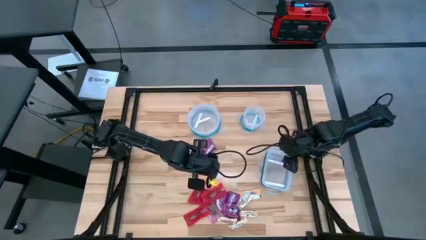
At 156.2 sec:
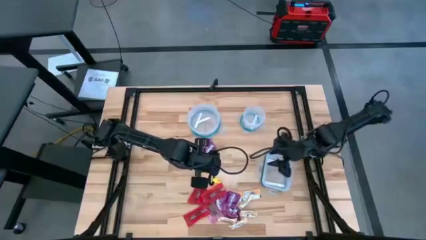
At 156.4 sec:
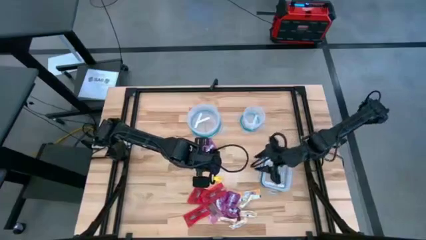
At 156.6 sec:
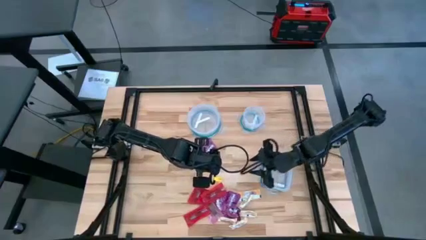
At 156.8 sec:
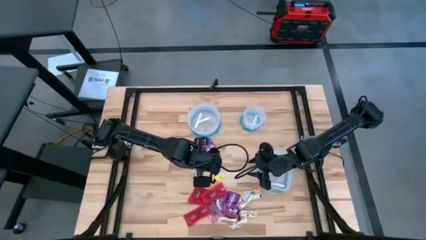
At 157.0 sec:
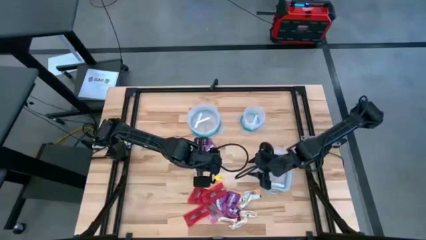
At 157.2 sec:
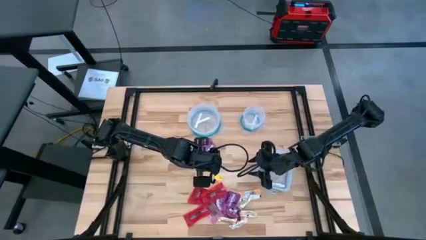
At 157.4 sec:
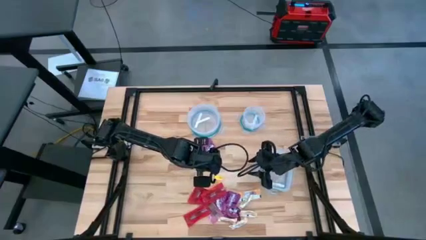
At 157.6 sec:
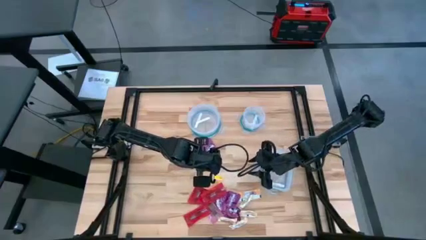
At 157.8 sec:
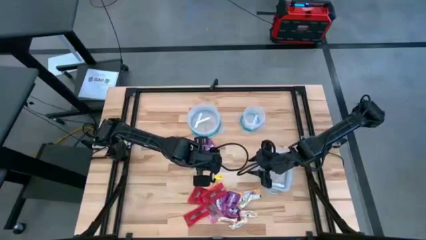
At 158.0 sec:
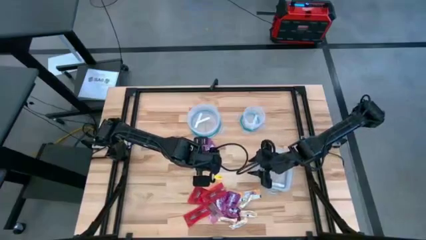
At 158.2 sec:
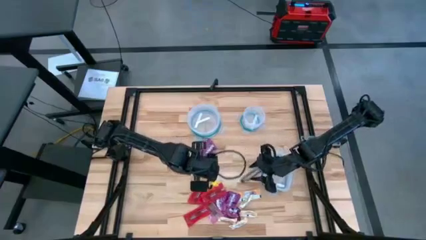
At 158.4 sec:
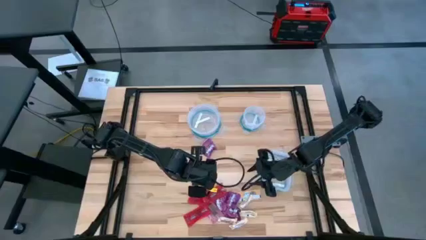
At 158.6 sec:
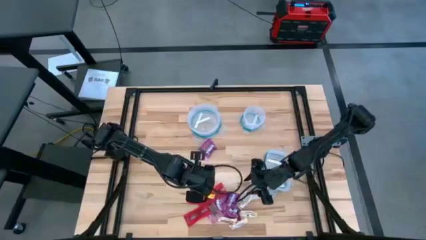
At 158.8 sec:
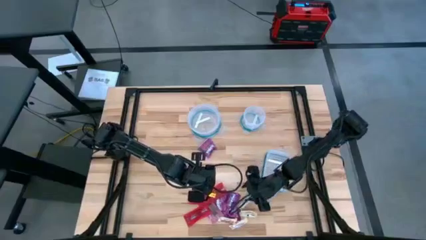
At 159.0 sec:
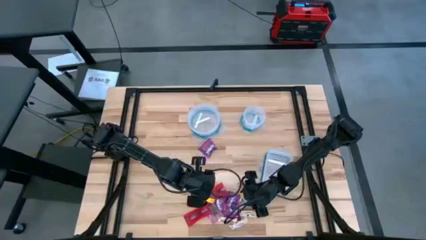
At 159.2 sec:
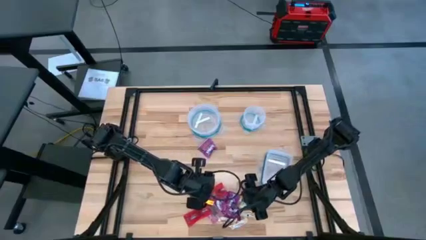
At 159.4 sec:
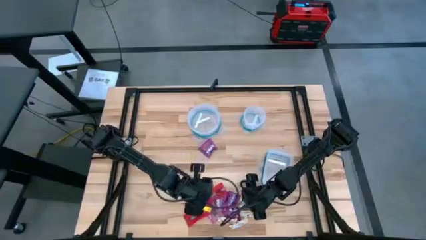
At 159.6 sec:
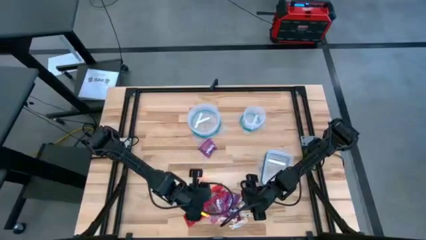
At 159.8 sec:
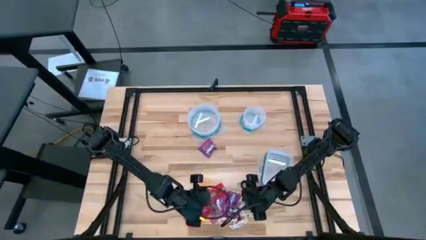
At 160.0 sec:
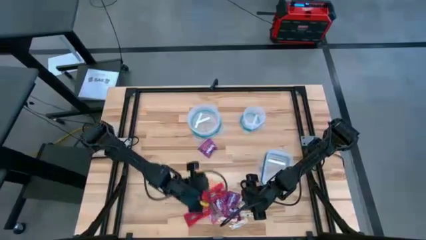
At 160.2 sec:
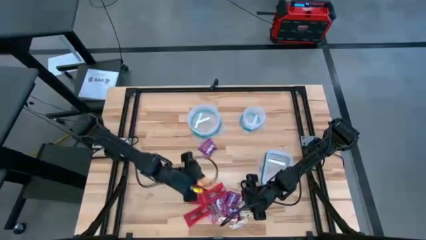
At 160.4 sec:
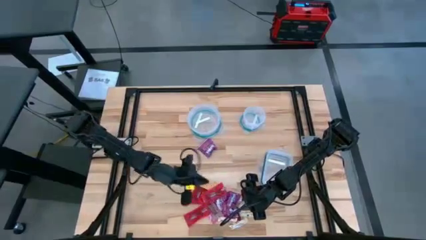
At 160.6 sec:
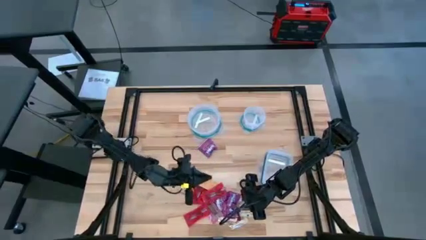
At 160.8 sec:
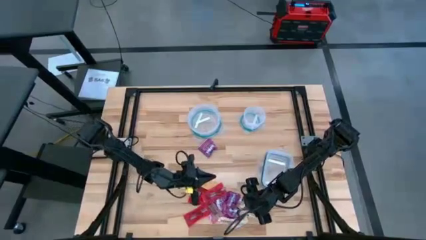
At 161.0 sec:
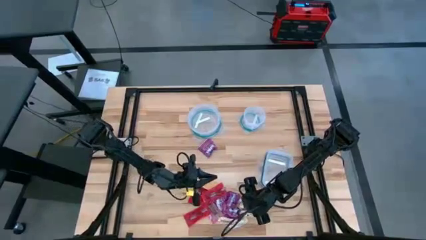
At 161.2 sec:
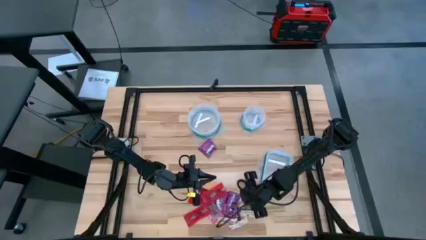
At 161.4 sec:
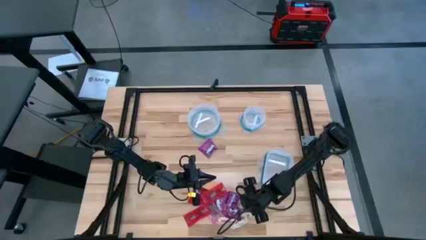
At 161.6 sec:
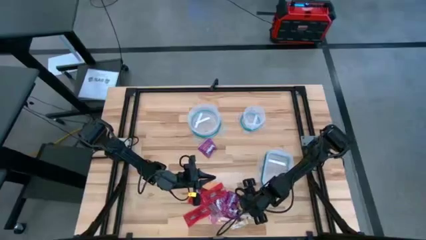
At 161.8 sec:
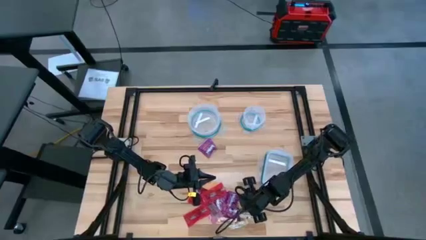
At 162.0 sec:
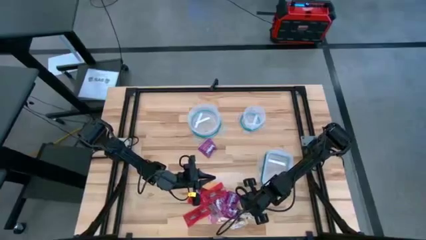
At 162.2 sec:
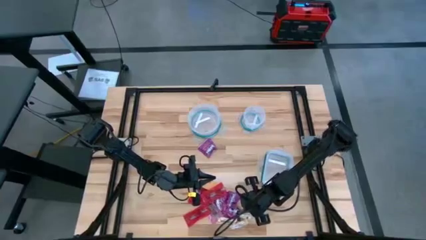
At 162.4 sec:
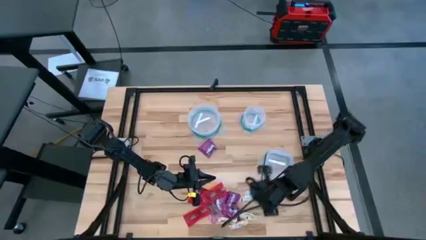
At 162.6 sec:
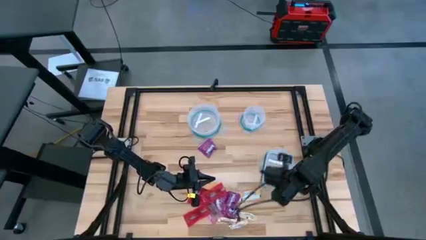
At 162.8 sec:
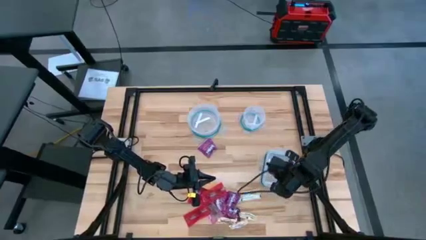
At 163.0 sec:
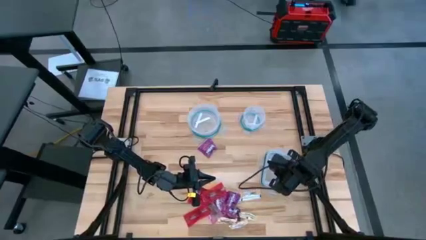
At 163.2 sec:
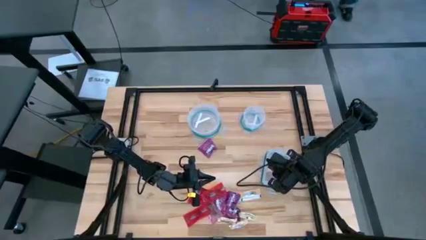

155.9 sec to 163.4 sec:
Task: Sort candy
Put the light yellow candy into the rectangular transparent bin

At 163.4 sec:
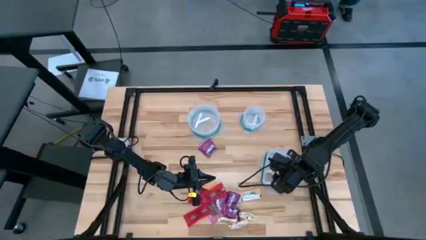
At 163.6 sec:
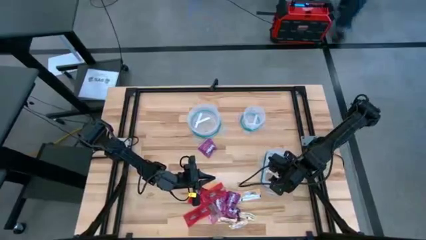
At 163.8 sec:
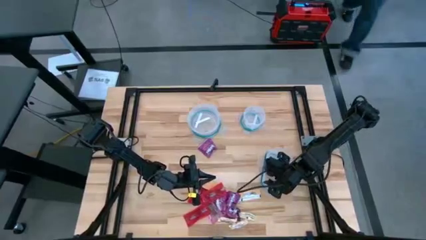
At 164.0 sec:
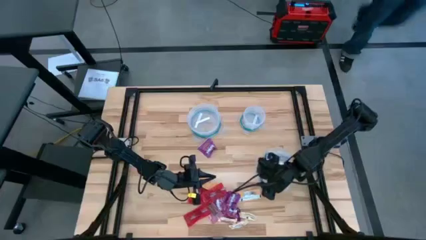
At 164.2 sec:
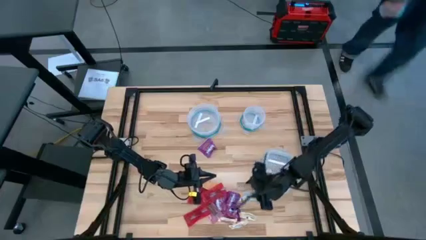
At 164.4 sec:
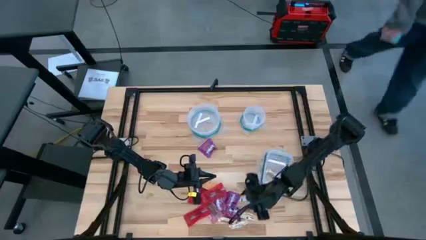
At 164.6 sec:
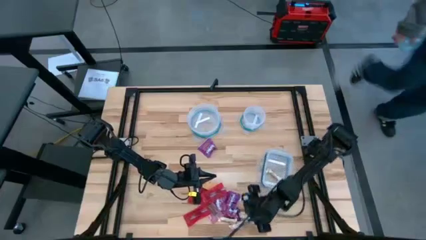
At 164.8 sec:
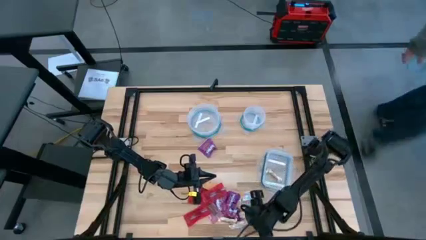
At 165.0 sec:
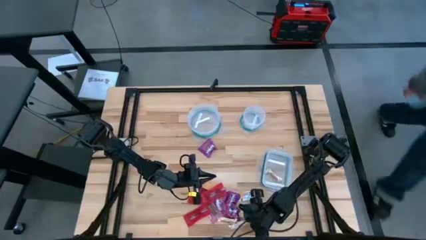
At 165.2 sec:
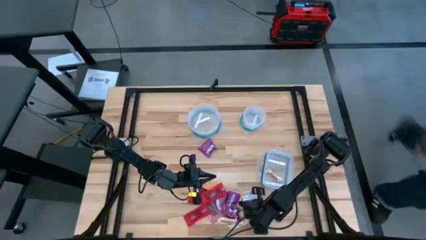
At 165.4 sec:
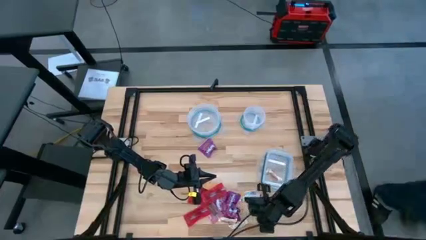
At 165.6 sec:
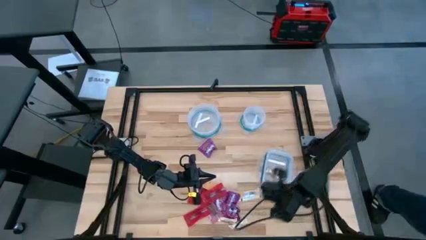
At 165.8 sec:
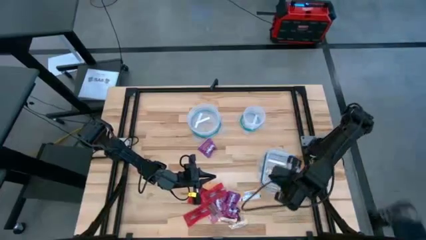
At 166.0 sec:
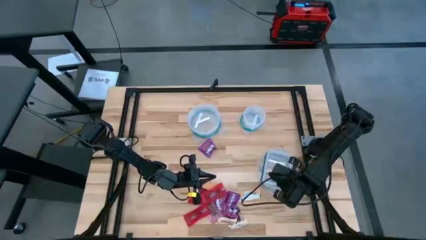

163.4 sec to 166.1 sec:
Put the light yellow candy into the rectangular transparent bin

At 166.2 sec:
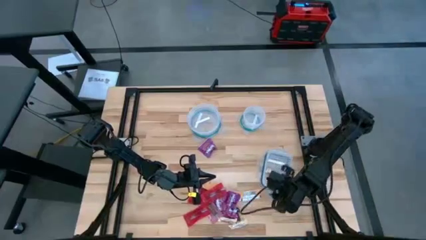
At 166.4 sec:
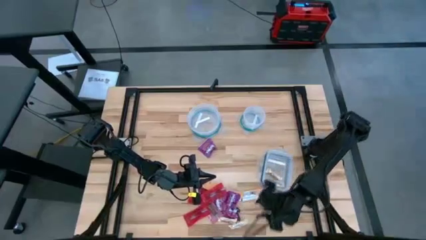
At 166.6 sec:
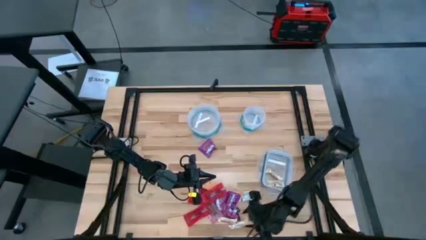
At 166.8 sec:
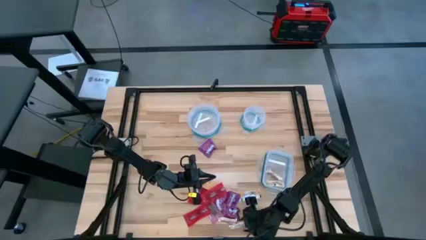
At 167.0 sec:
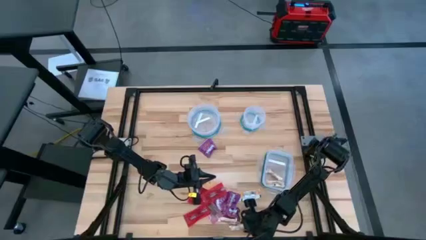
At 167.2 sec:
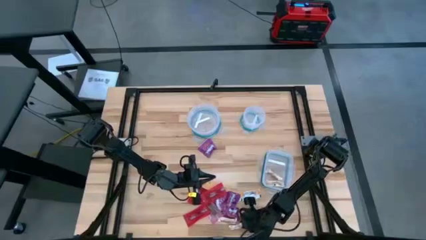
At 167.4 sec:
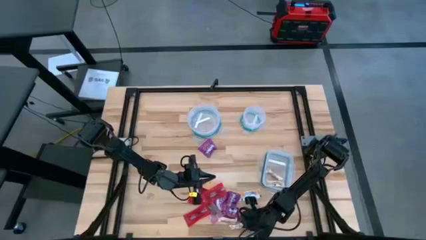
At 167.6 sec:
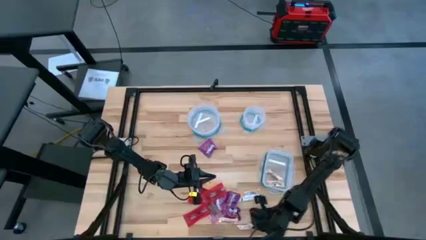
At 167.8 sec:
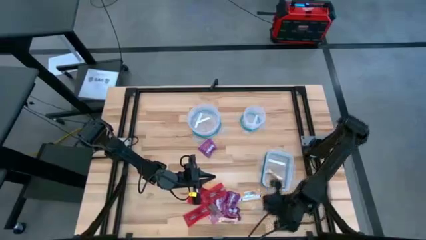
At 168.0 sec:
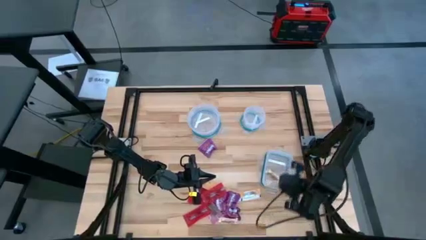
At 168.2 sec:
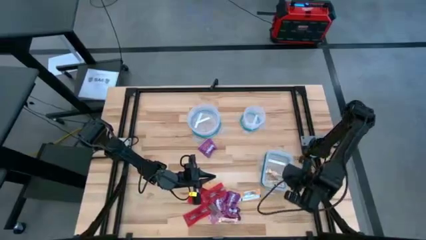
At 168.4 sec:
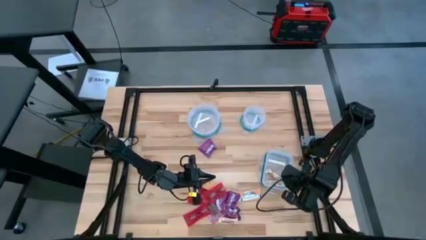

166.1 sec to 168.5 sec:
Put the light yellow candy into the rectangular transparent bin

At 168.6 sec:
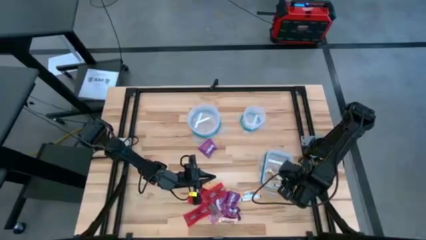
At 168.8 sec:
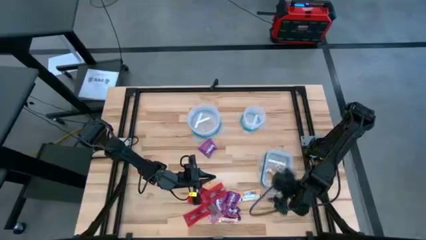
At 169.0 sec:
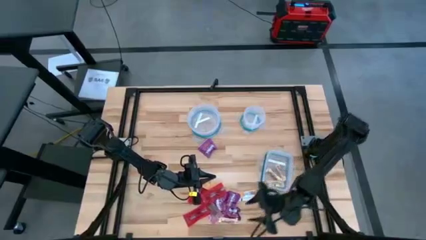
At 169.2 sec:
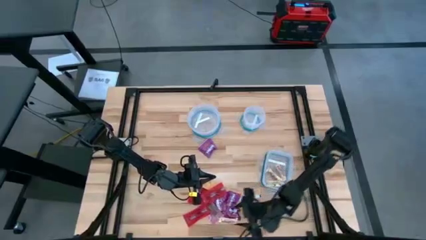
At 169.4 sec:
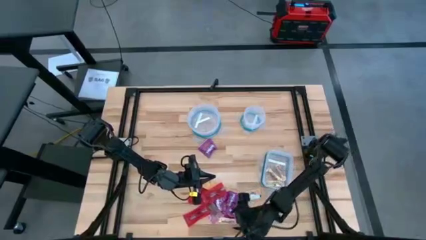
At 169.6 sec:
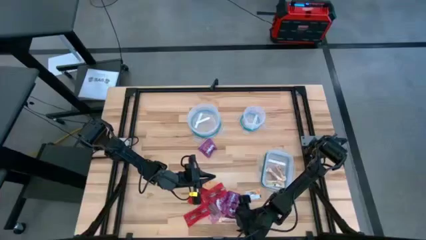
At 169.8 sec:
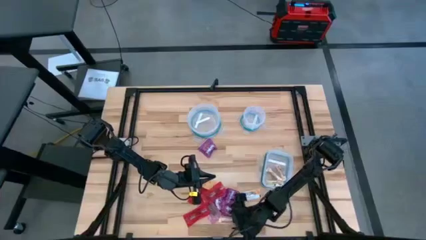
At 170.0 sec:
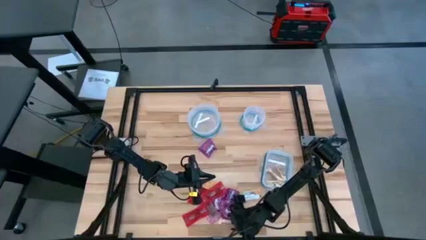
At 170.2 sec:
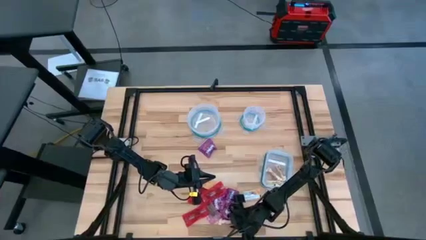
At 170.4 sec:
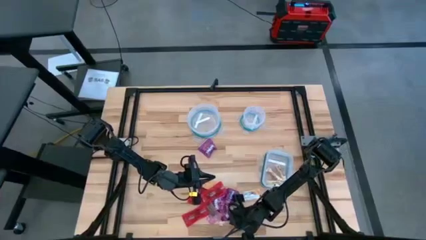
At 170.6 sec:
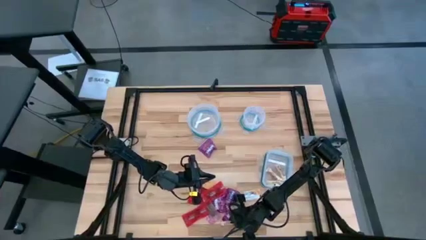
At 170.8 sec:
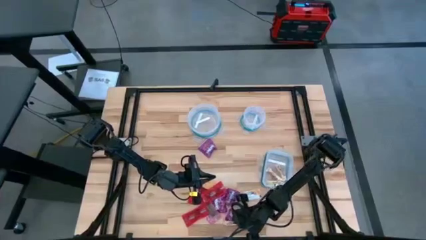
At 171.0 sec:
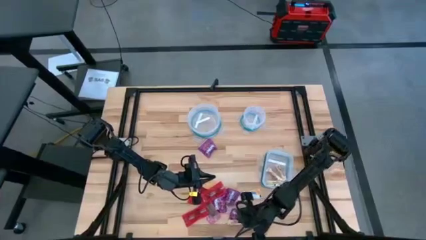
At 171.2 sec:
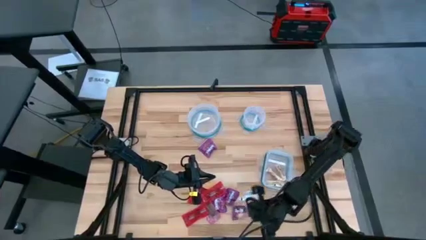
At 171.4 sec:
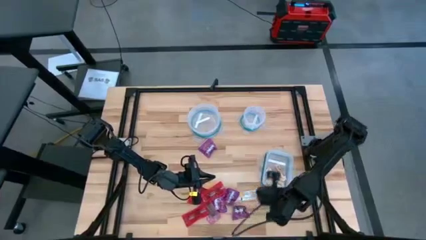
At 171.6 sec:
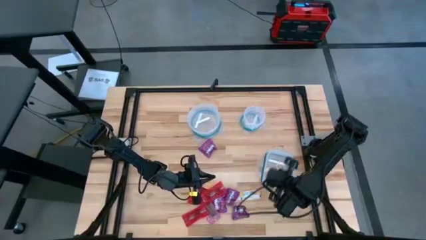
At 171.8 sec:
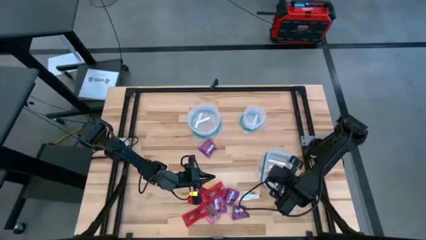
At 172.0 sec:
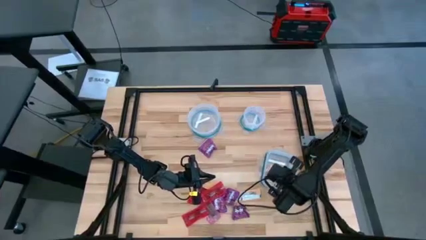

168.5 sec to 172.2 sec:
Put the light yellow candy into the rectangular transparent bin
